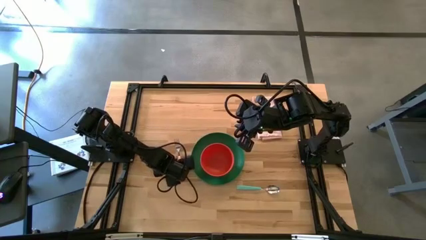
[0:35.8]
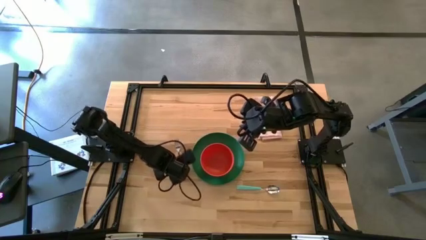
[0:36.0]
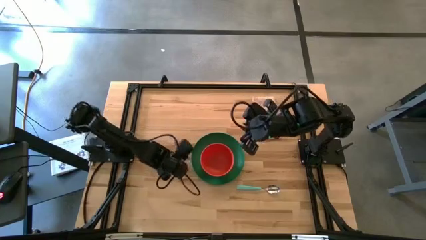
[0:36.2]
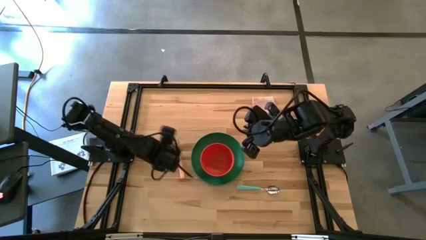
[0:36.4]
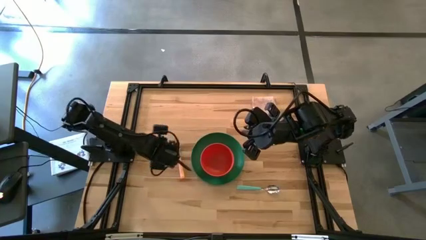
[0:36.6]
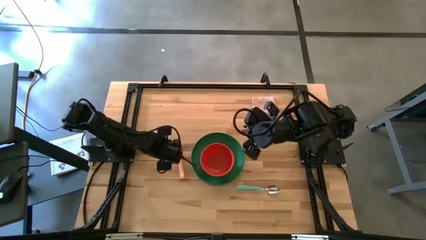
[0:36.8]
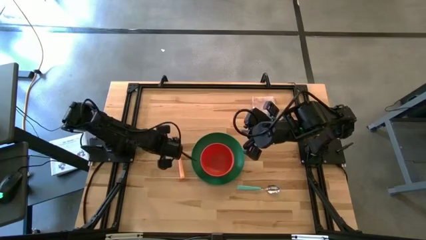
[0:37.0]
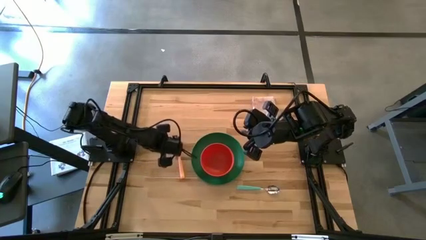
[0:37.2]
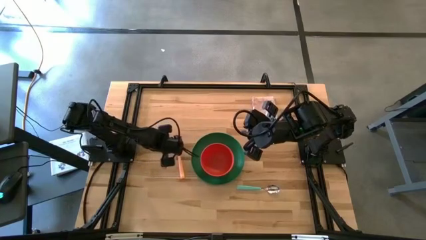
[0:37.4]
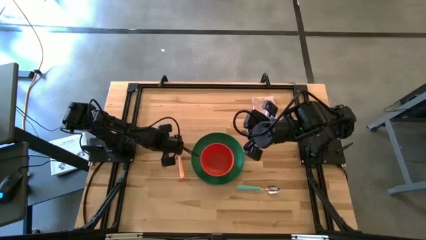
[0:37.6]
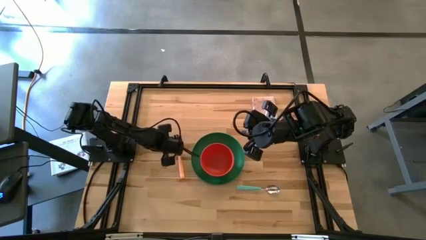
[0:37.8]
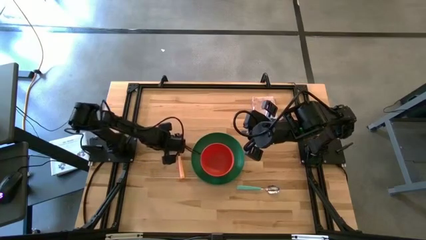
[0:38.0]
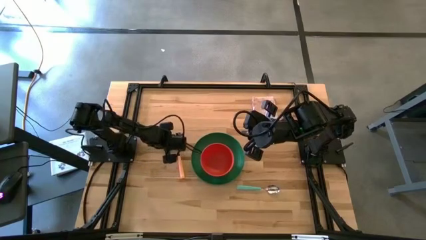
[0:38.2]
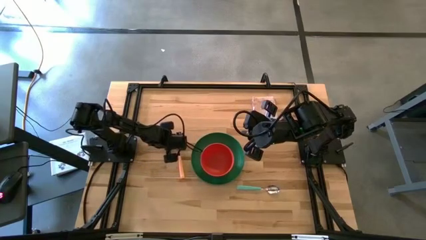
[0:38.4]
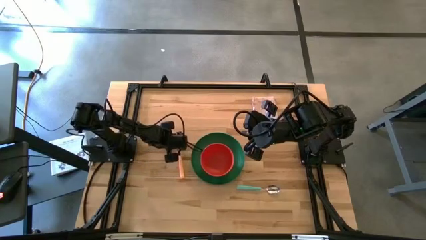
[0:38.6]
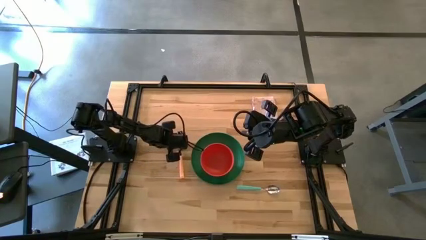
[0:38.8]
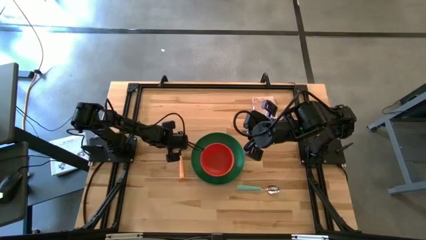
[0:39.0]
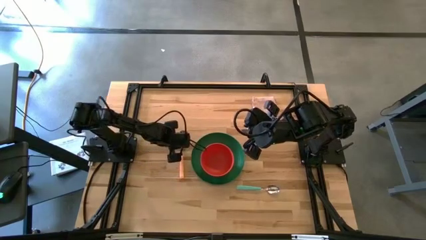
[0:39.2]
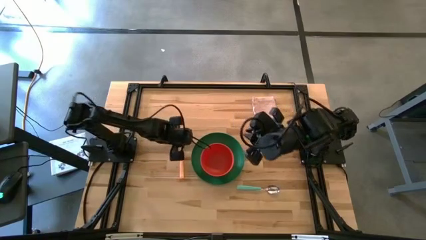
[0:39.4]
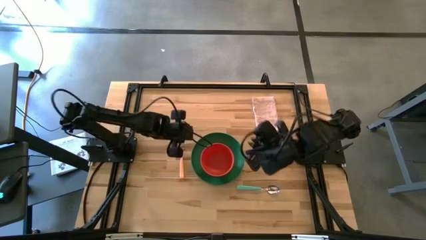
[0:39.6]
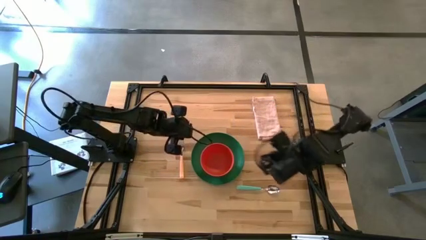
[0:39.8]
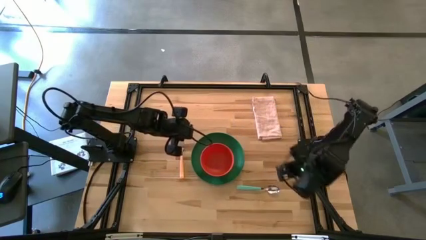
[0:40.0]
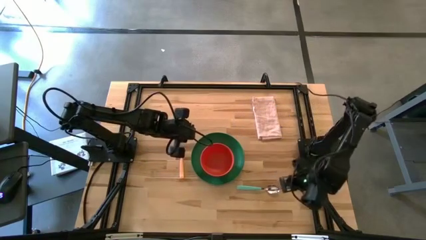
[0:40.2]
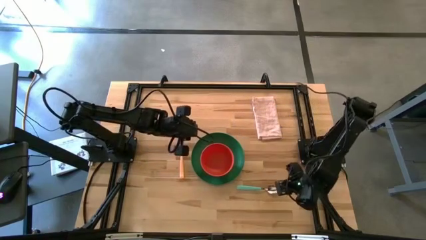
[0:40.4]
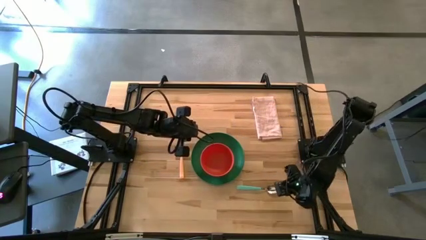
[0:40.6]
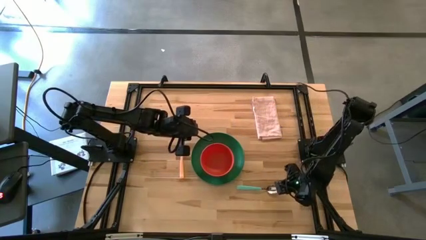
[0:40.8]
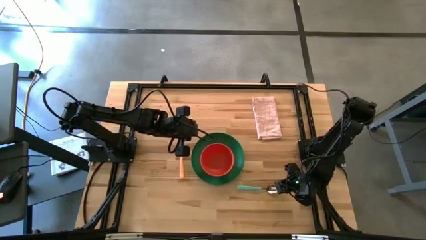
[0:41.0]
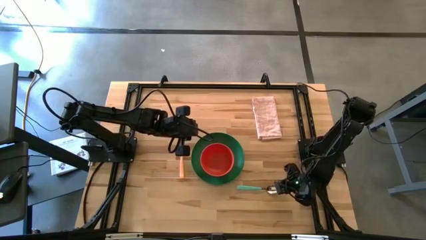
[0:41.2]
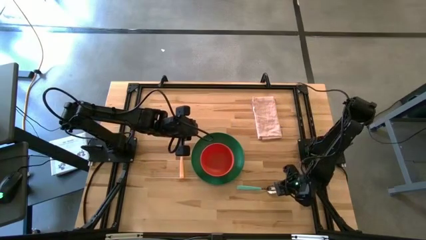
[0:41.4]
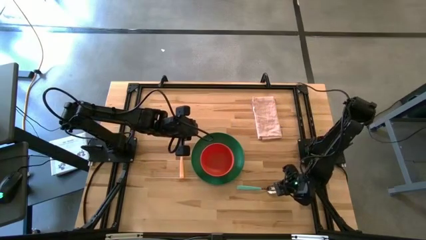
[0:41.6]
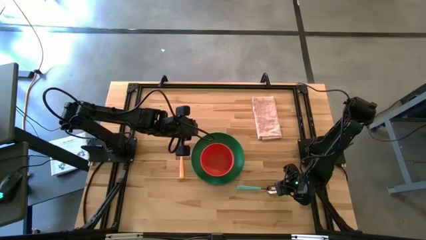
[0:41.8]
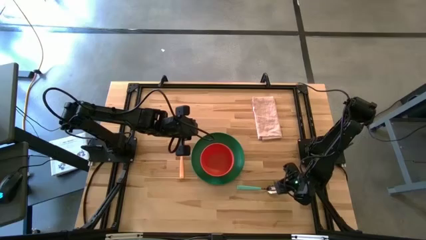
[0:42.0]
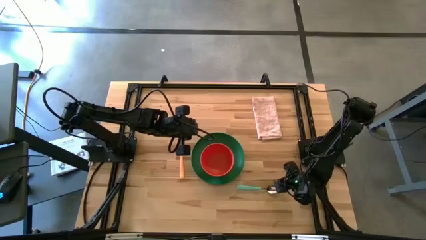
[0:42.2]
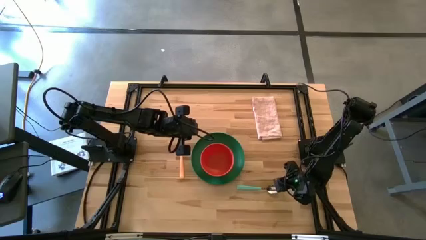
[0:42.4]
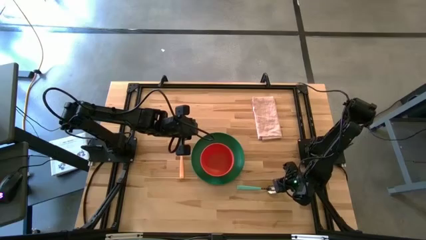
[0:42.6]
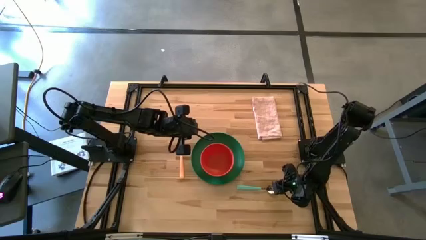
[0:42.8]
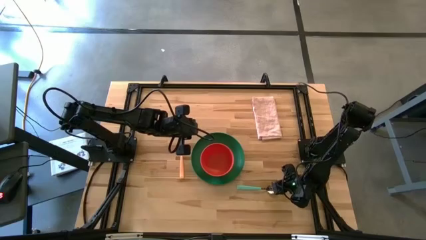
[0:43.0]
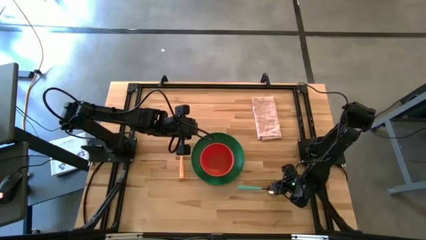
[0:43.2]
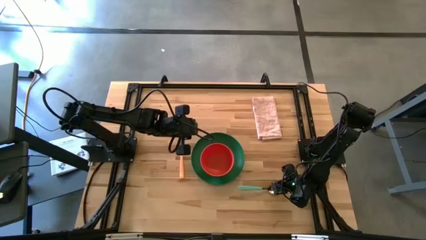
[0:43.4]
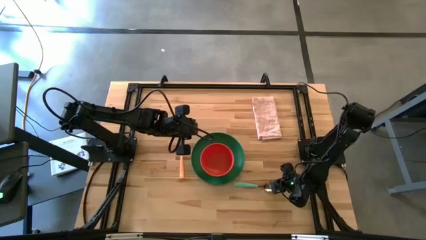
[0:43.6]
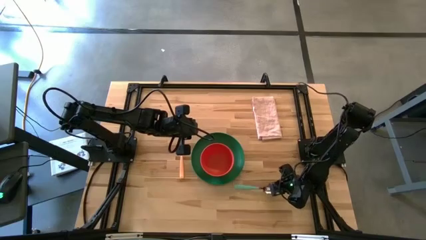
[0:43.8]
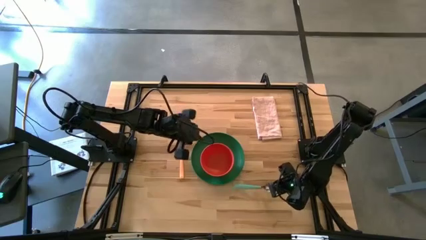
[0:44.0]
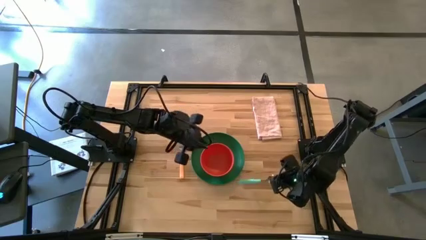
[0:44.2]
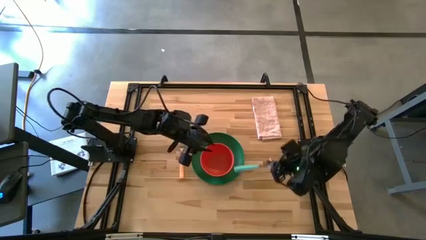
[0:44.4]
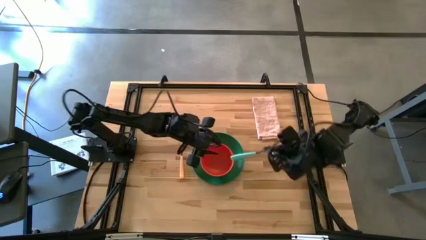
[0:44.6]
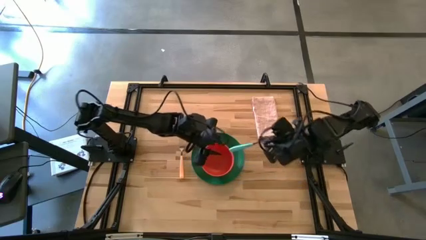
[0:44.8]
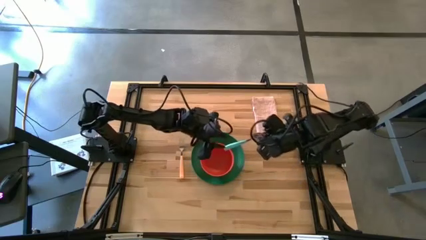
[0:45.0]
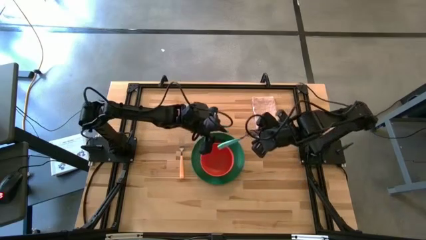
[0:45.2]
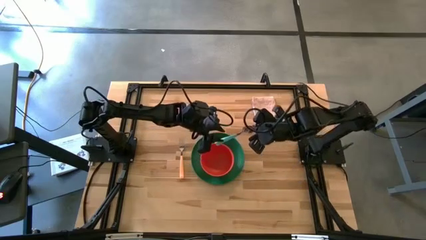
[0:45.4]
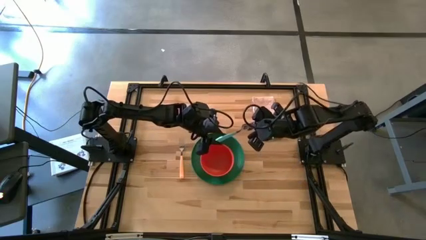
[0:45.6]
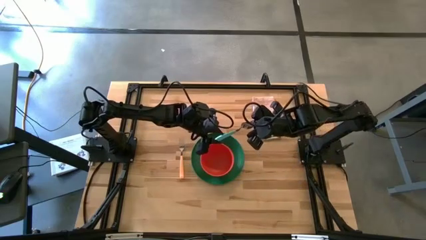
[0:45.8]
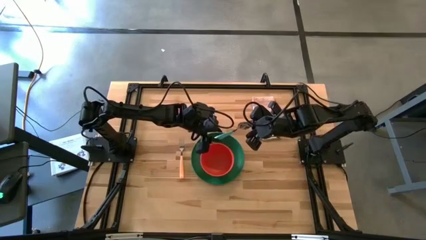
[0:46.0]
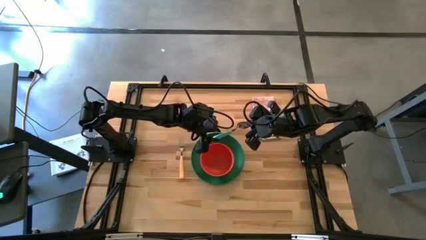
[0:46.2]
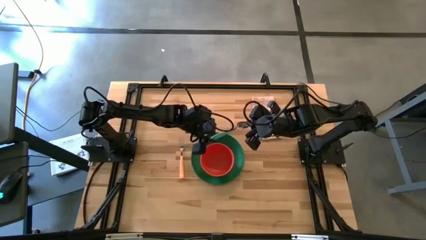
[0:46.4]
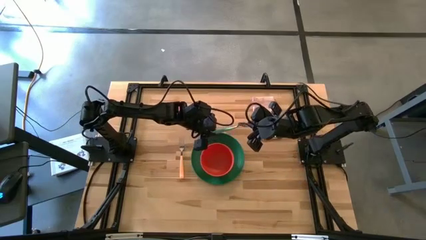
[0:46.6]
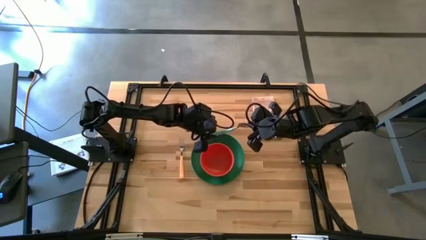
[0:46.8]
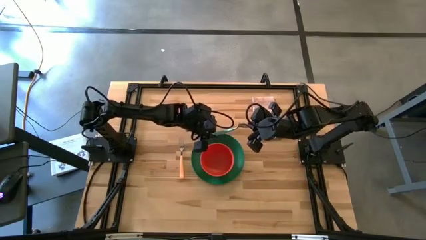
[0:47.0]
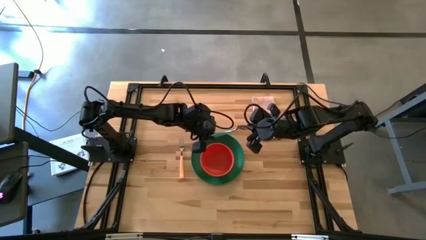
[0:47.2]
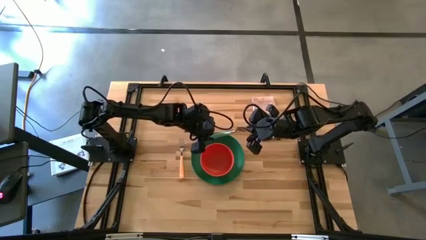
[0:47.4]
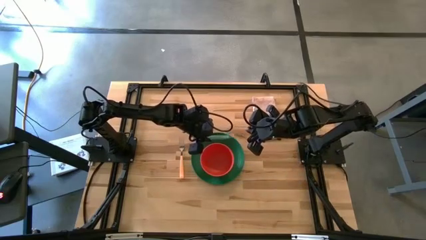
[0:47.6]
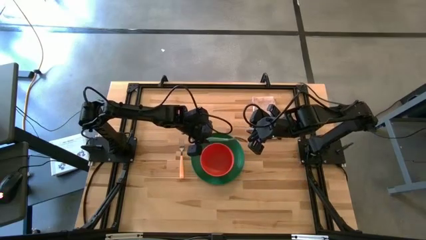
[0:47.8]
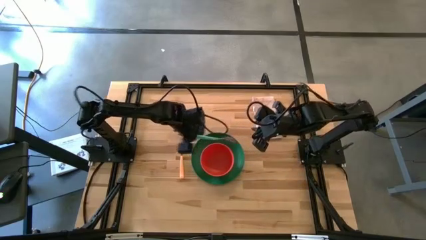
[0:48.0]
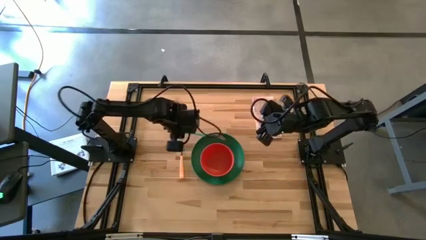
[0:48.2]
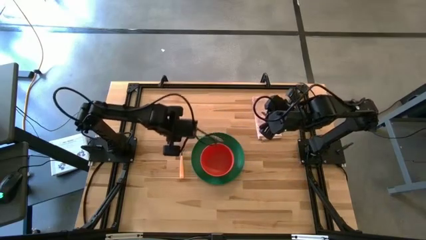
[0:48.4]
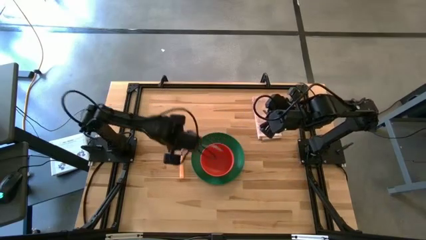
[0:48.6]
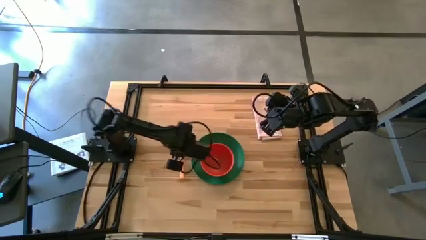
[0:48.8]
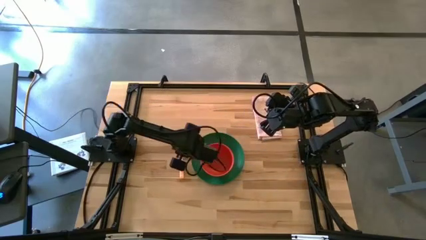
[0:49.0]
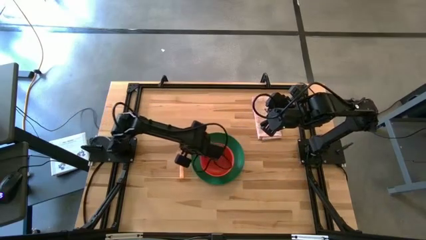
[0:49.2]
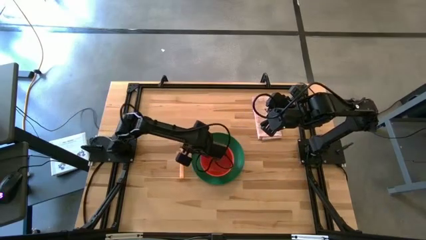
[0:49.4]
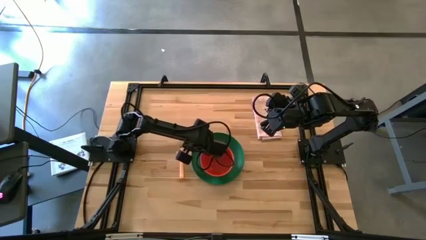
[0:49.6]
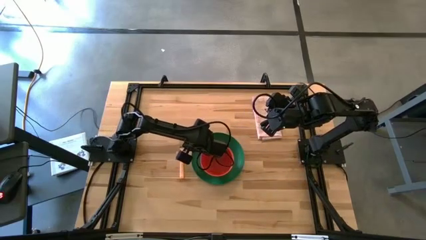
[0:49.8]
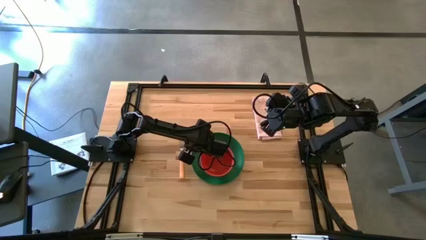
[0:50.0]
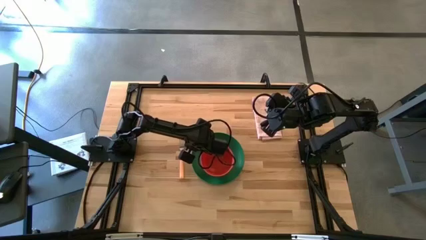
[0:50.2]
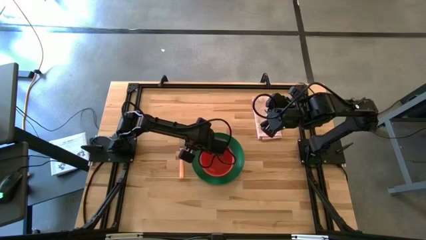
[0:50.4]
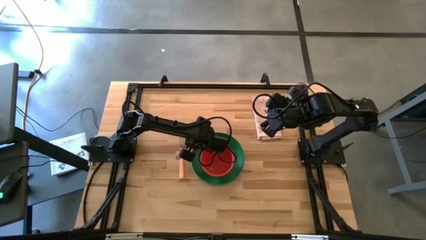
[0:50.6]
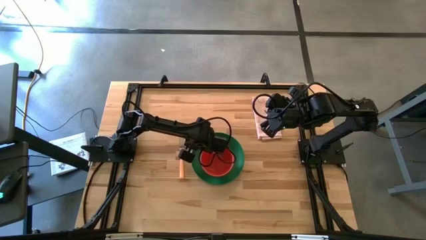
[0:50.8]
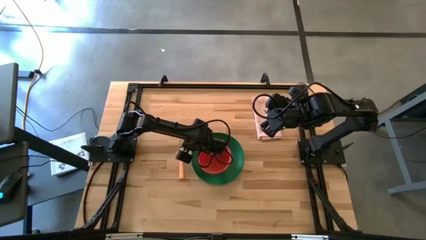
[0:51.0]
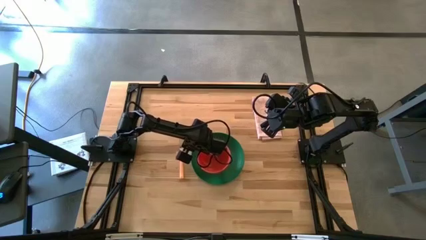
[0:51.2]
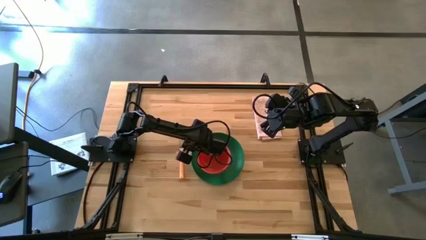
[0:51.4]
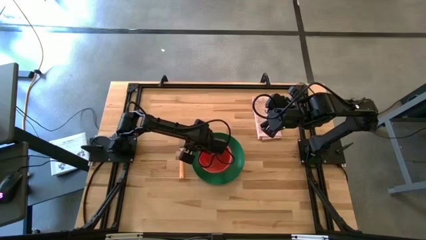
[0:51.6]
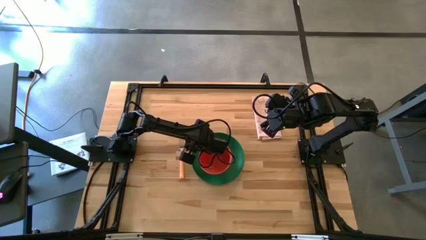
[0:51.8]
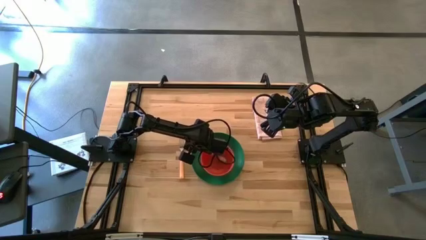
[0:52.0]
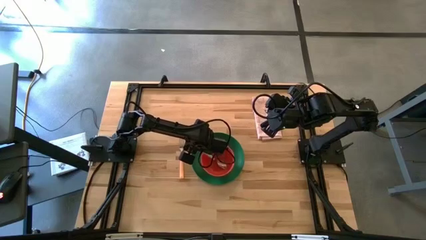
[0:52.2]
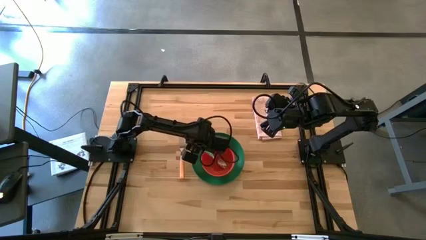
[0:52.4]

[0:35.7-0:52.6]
Task: Set table place
Put the blue spoon into the orange bowl
